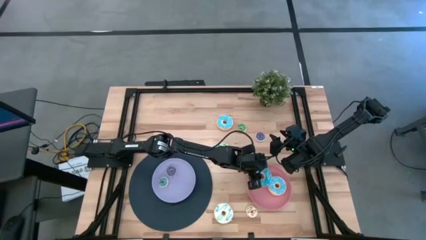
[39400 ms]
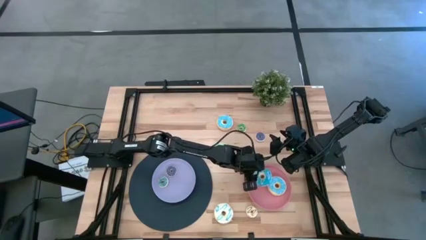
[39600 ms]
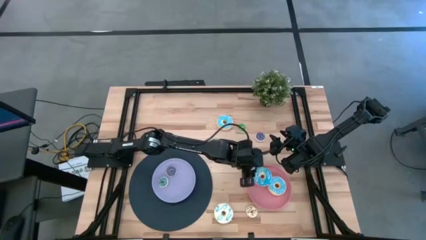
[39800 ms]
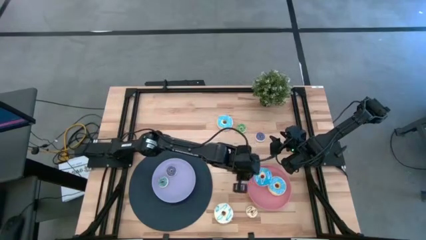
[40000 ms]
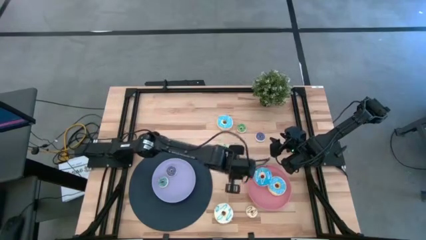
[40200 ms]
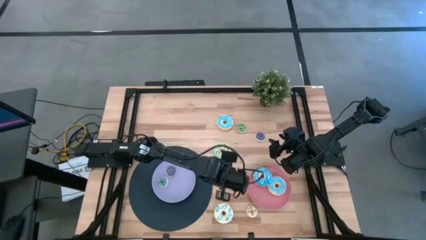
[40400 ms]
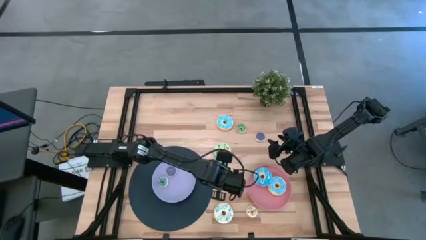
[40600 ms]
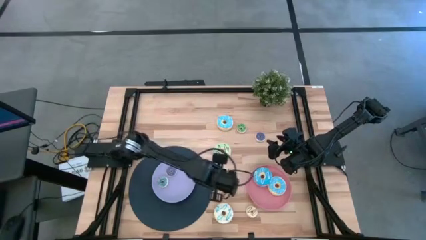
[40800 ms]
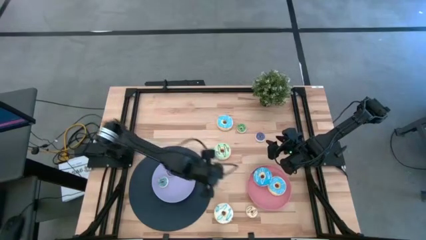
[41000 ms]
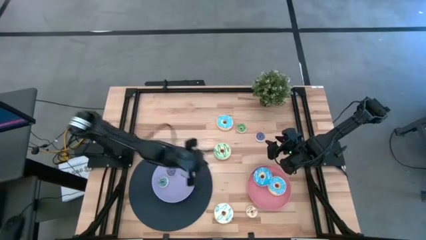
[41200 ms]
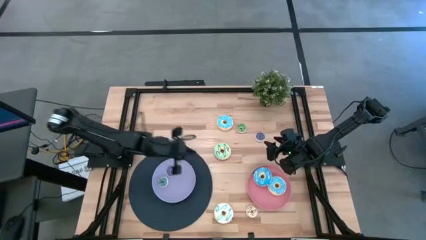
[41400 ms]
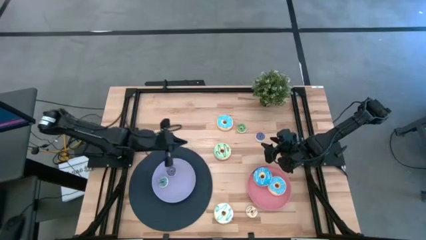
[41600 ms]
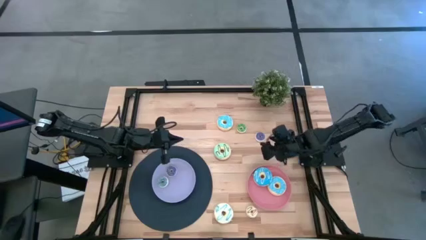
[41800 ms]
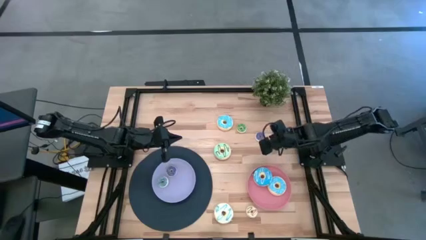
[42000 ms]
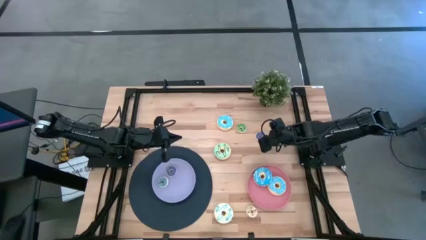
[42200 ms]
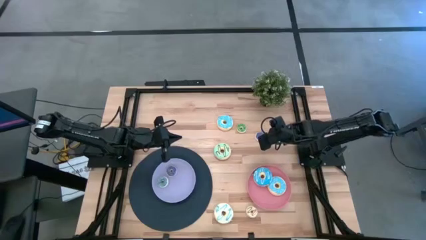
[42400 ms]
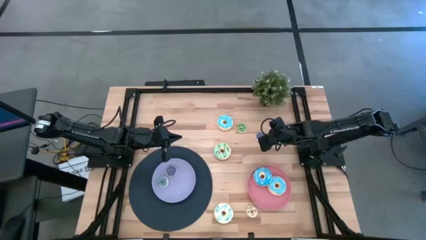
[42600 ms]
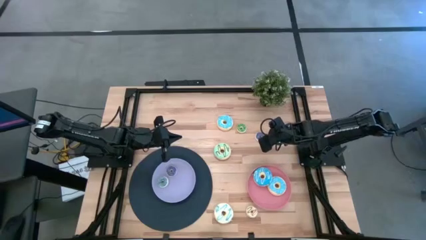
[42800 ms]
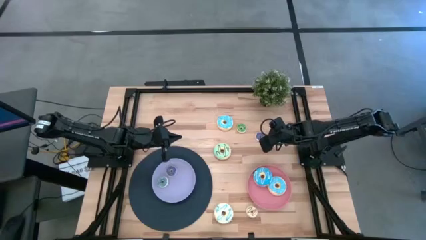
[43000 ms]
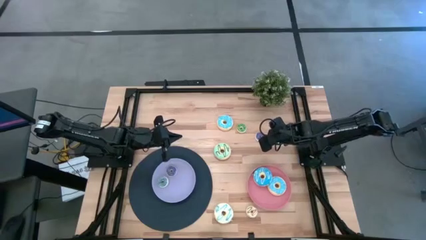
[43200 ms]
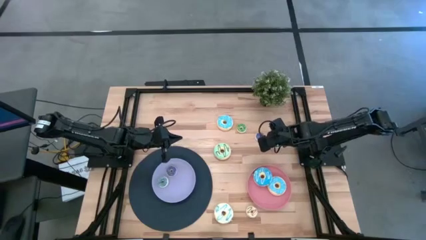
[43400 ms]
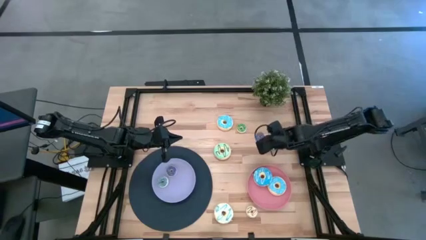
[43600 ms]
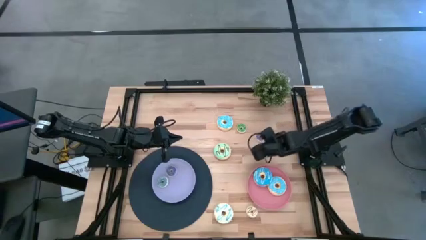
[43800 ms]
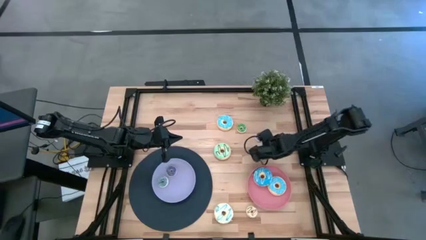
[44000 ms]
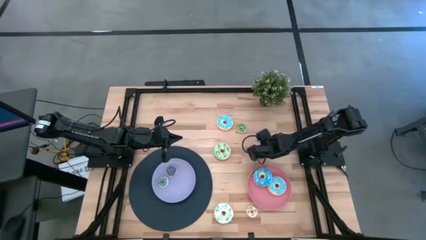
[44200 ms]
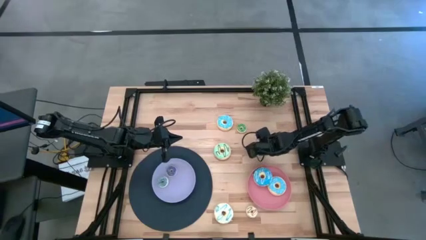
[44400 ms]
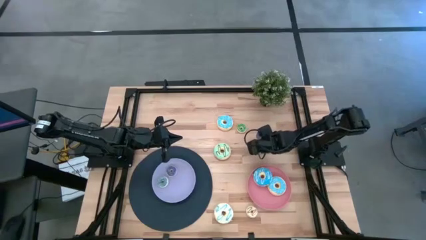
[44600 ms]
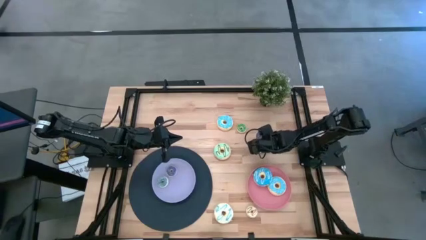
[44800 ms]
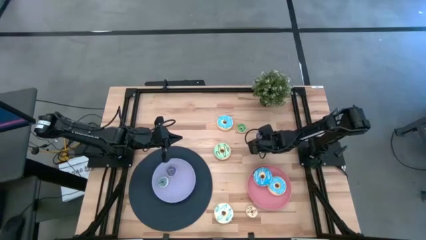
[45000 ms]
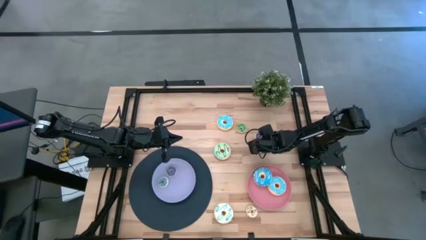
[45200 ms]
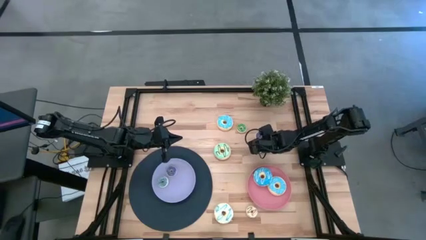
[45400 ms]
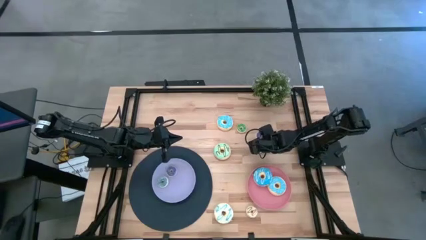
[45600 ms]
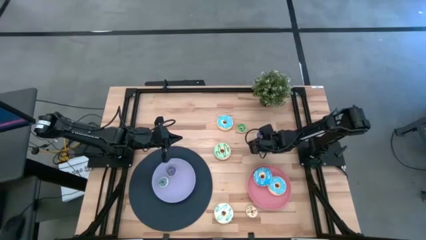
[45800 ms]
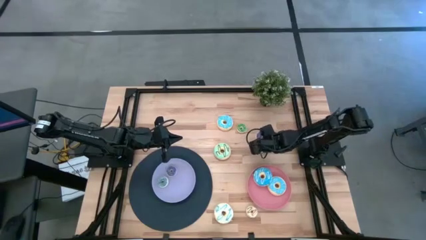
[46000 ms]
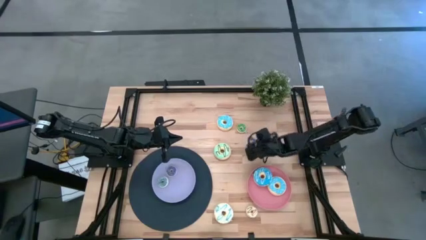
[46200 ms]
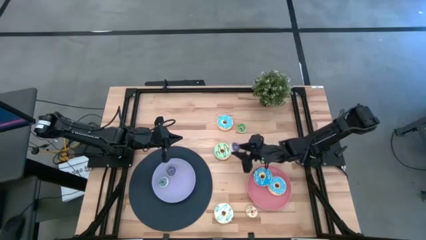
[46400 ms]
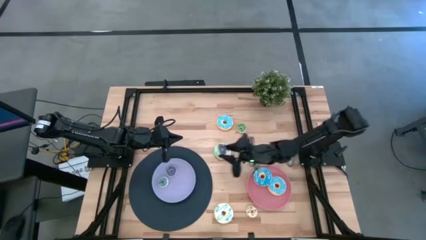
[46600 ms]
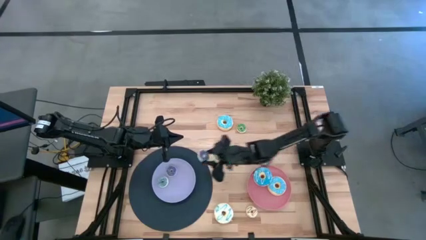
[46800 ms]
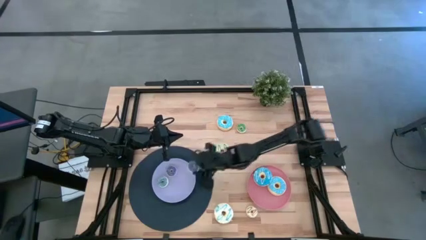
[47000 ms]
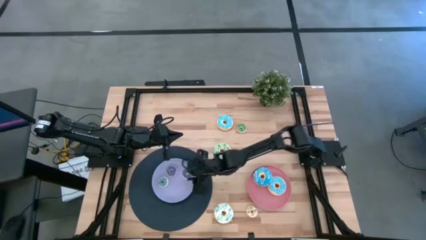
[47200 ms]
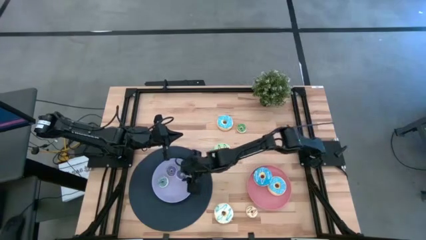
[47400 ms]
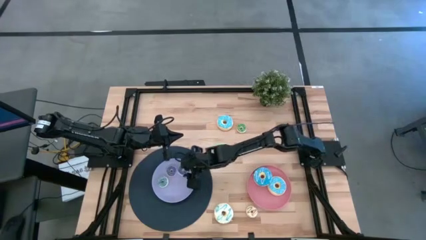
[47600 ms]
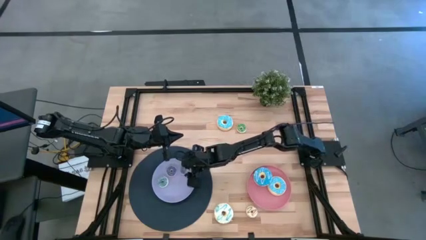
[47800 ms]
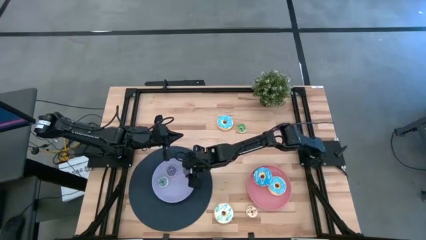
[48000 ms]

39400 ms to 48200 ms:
Task: Pick & Place donuts
Put the small dark blue donut on the pink plate

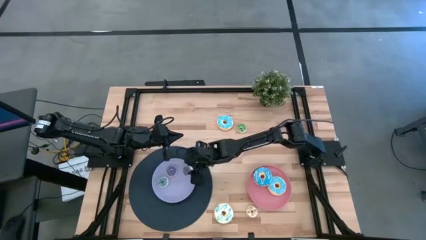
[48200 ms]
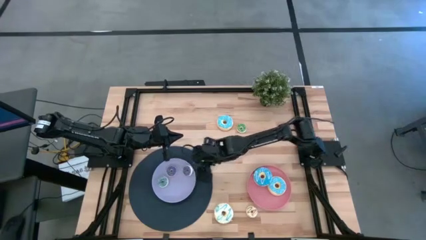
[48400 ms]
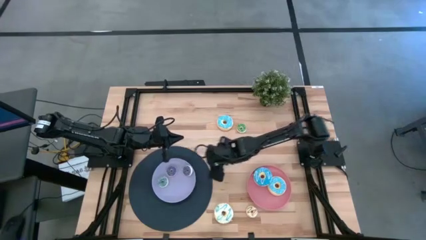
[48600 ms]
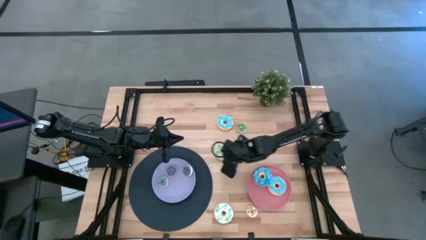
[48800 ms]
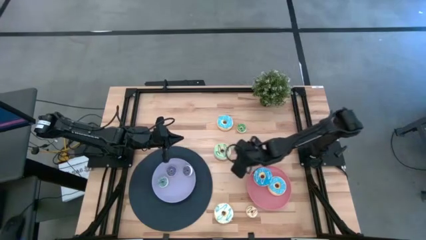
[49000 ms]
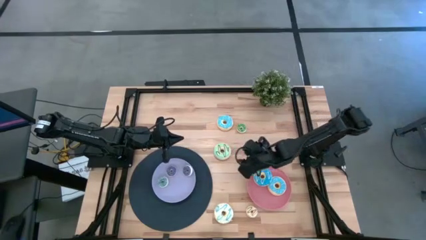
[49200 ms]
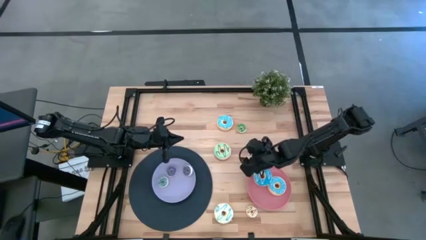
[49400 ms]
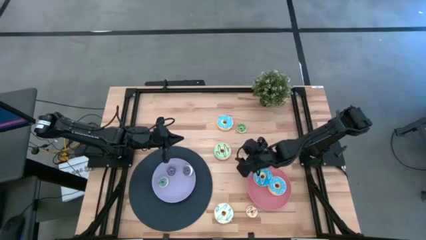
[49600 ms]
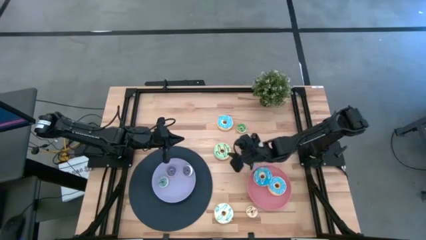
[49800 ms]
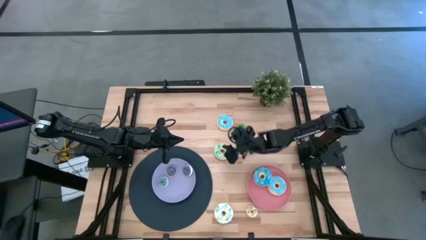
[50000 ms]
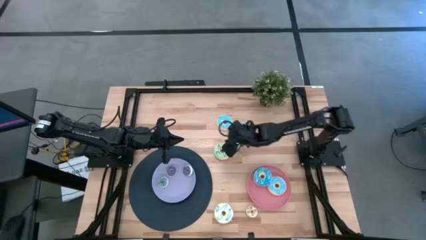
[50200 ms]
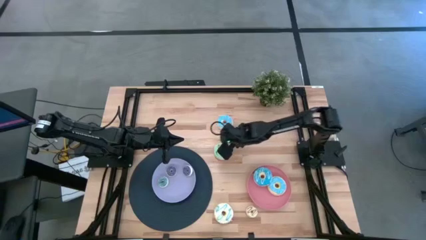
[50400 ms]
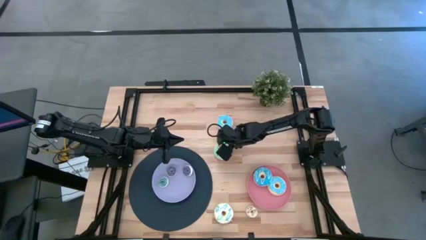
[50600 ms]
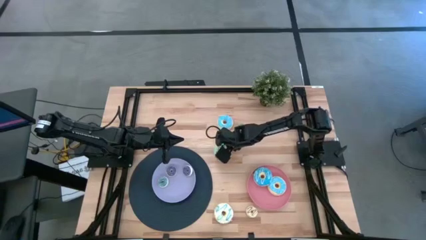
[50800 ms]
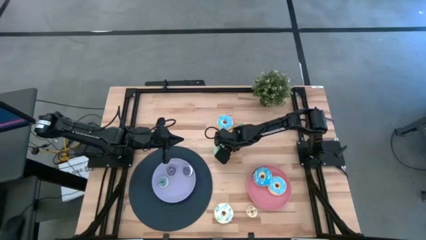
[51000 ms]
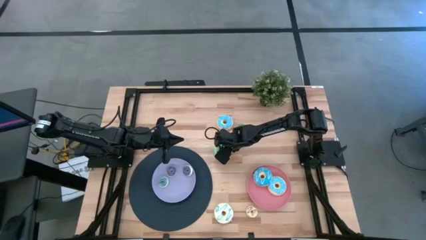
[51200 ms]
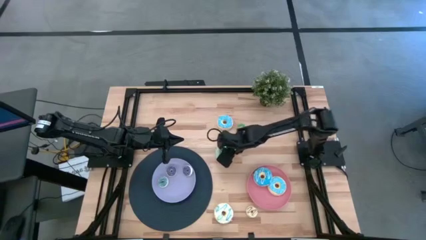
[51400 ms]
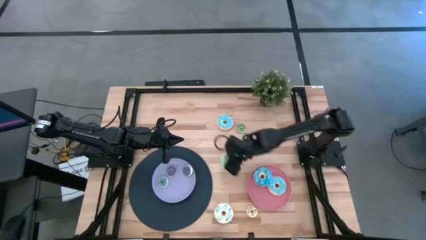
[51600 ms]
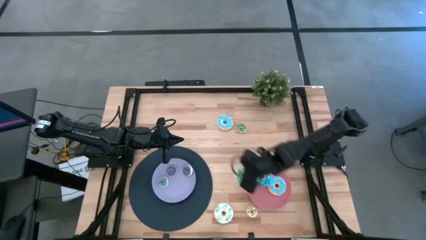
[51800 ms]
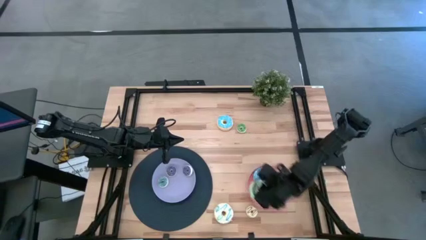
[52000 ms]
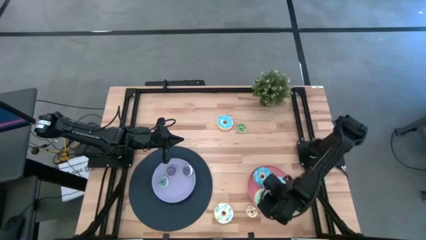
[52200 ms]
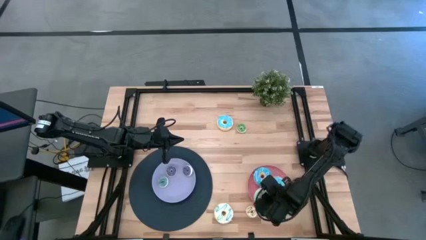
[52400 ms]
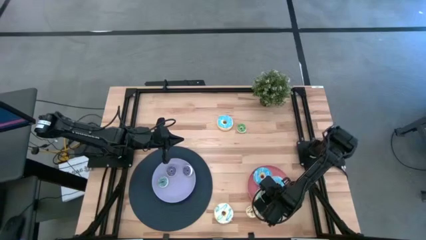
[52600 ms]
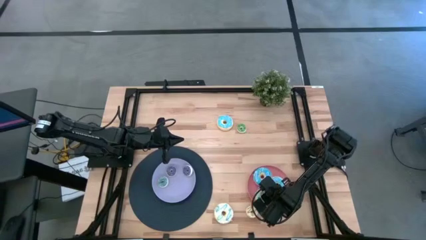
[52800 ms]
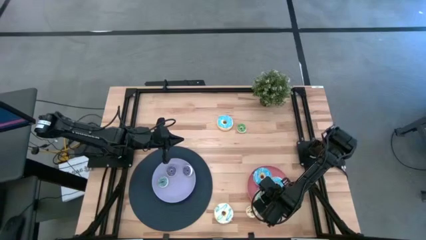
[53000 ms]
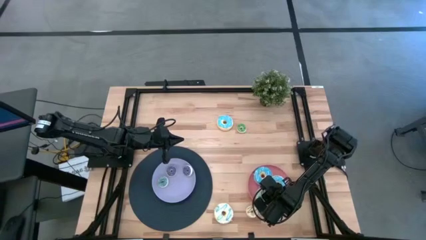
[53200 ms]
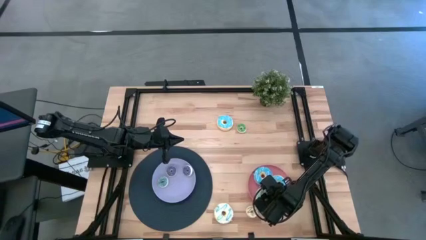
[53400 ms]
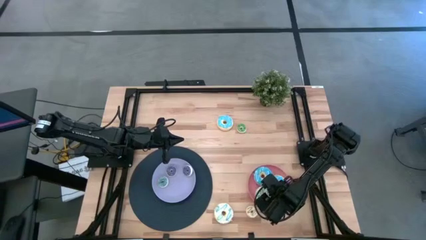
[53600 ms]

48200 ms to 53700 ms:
Put the large light green donut on the pink plate

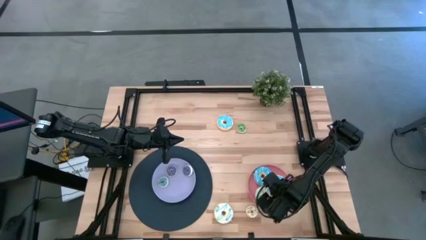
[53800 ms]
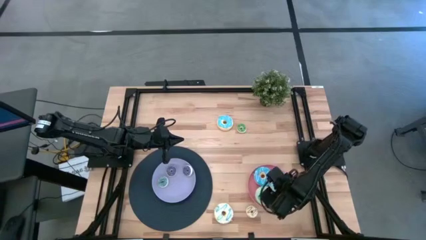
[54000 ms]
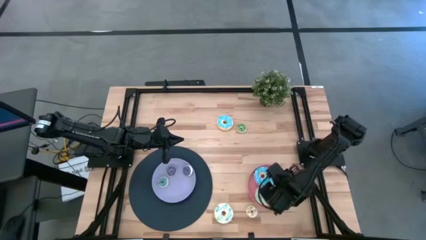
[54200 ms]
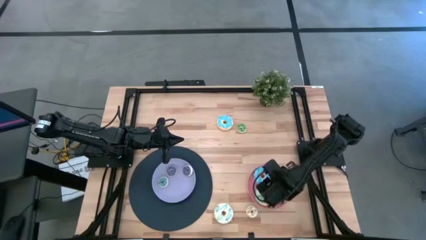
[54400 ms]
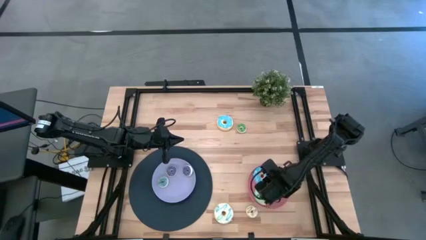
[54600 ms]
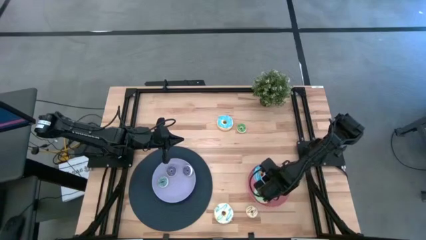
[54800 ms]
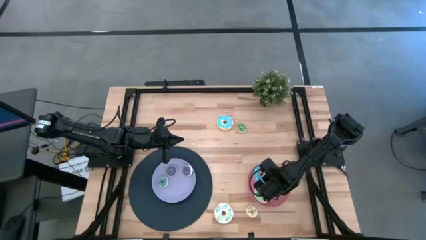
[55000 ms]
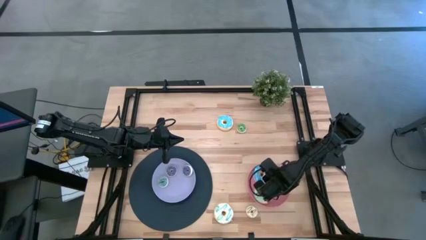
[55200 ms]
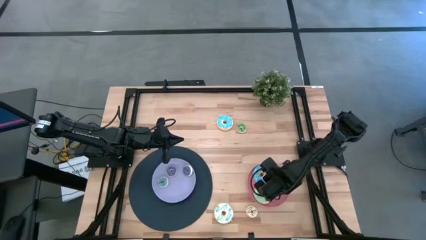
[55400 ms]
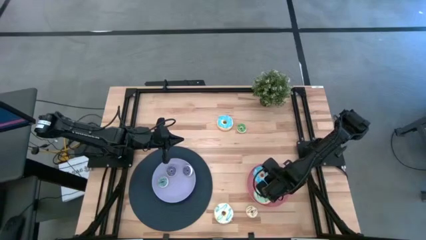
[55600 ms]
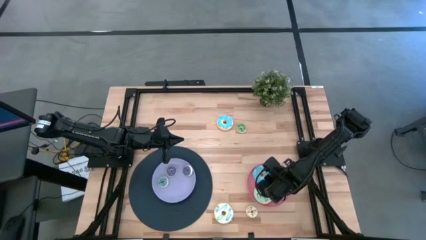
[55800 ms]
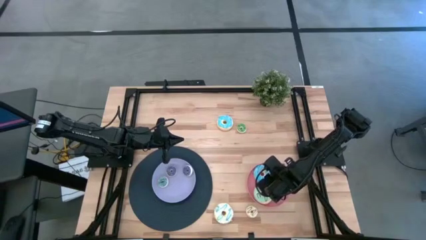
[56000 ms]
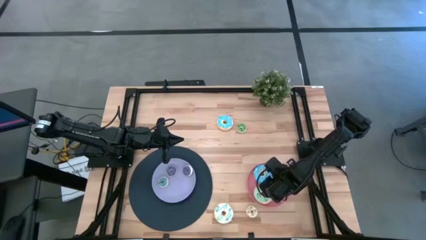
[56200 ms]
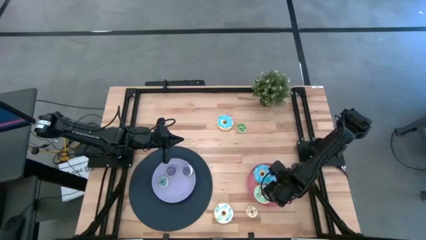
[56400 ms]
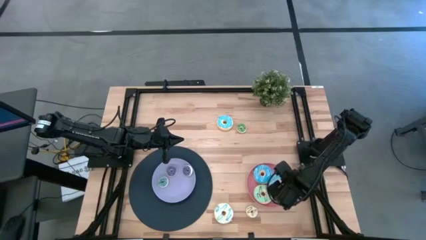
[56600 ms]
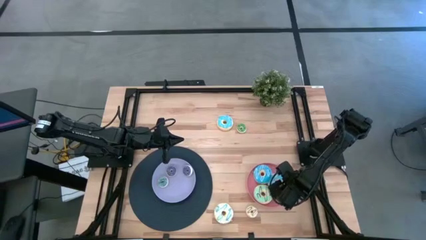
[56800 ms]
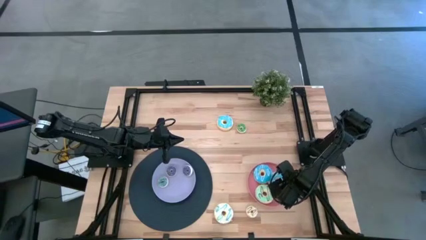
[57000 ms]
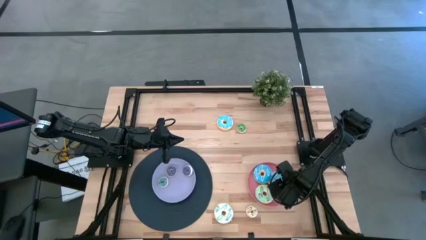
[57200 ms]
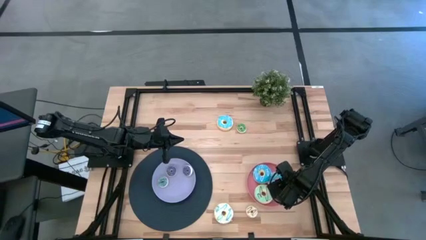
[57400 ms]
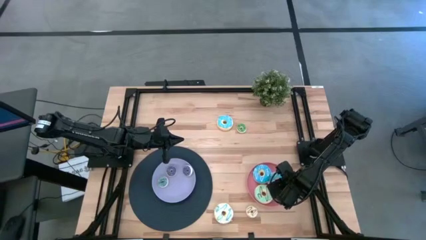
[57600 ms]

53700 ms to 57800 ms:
Adjust the large blue donut on the pink plate

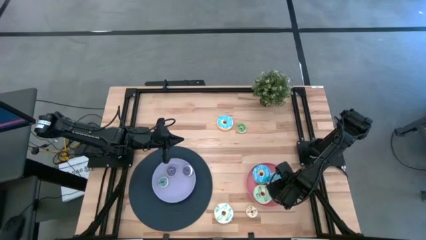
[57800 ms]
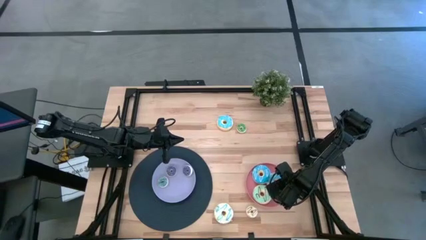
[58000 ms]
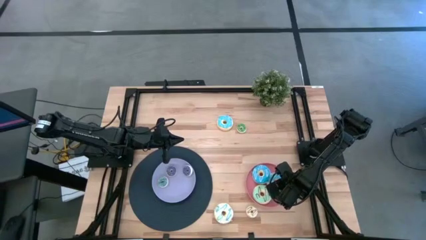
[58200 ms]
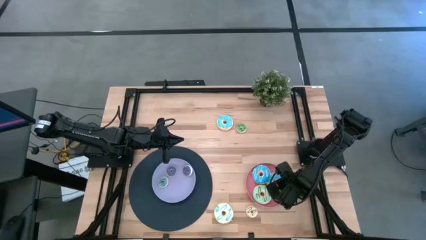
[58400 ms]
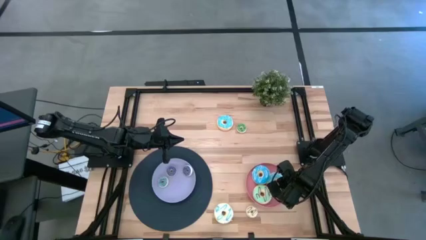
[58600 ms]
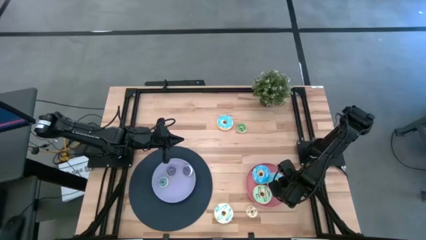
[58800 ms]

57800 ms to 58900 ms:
Adjust the large blue donut on the pink plate
